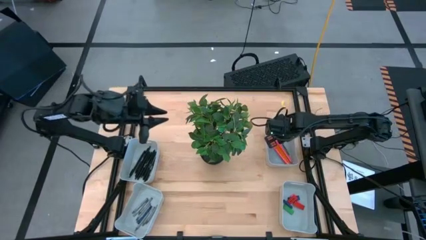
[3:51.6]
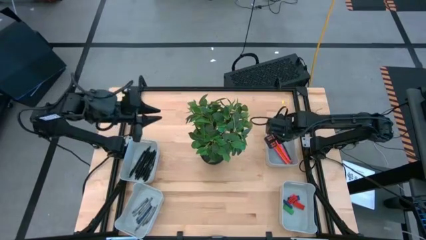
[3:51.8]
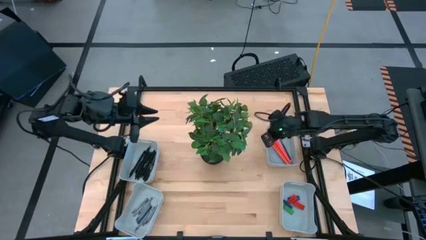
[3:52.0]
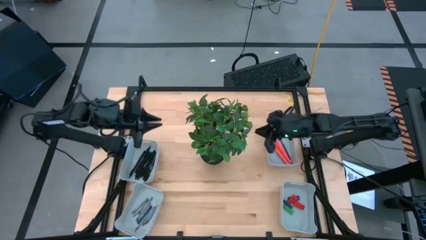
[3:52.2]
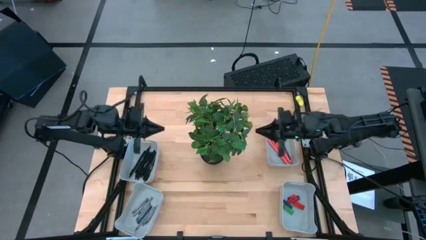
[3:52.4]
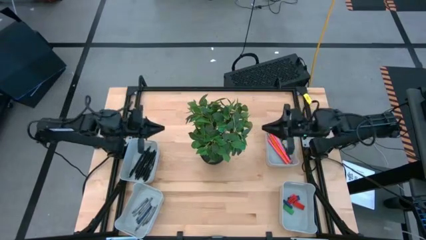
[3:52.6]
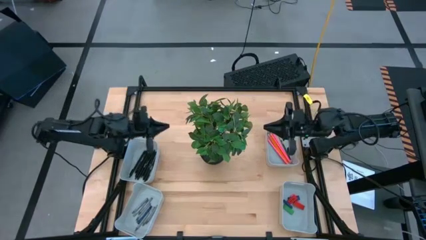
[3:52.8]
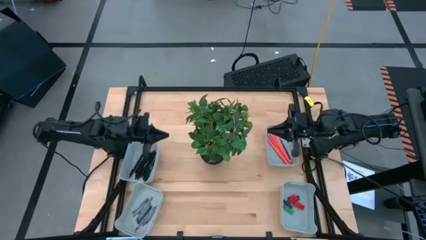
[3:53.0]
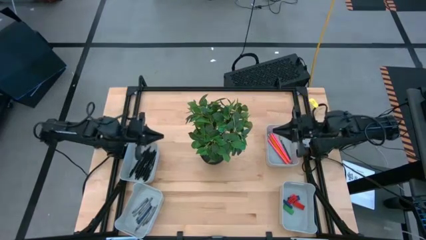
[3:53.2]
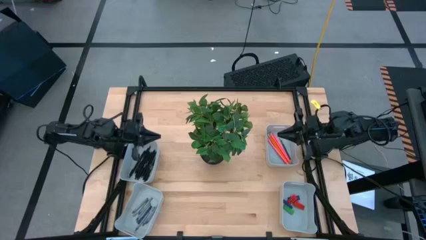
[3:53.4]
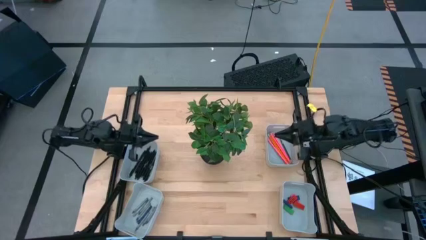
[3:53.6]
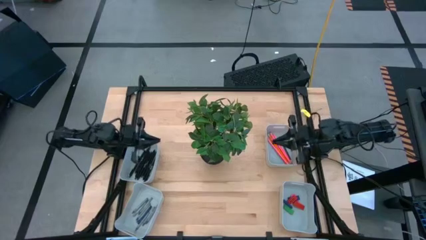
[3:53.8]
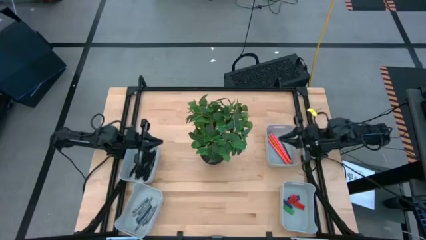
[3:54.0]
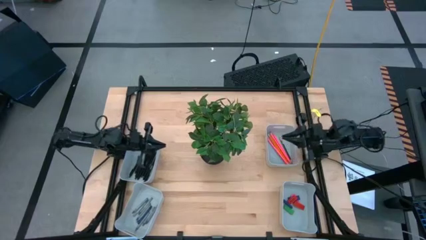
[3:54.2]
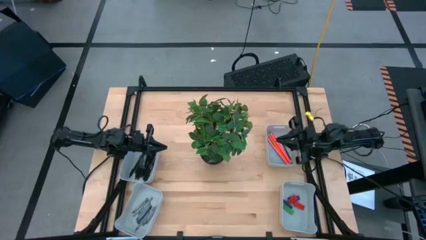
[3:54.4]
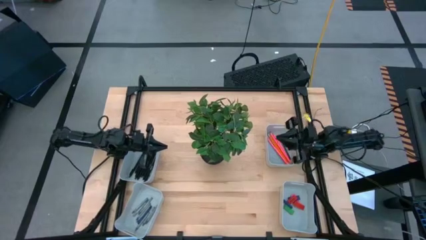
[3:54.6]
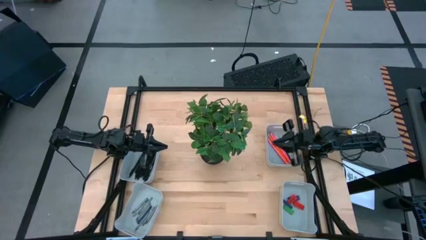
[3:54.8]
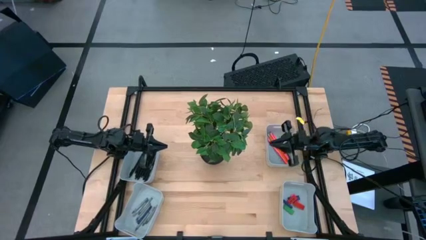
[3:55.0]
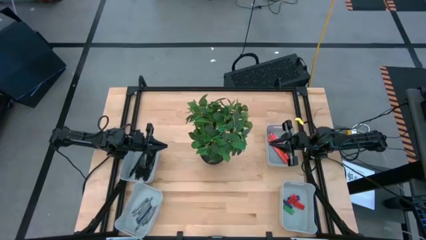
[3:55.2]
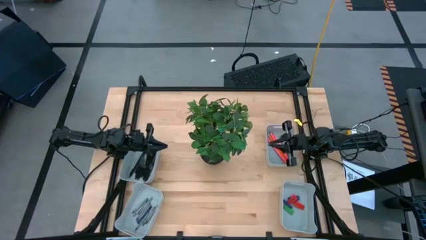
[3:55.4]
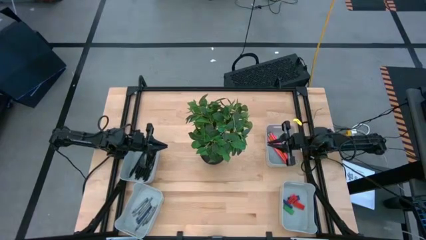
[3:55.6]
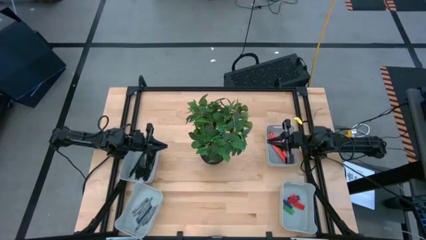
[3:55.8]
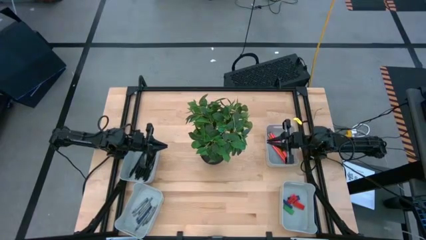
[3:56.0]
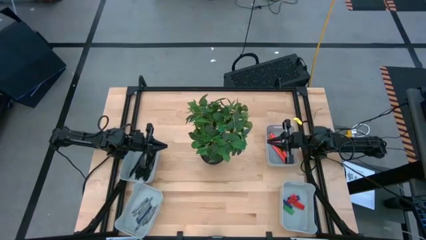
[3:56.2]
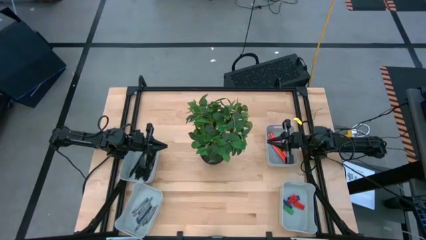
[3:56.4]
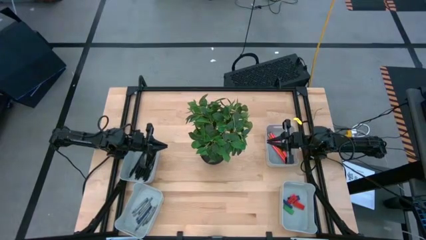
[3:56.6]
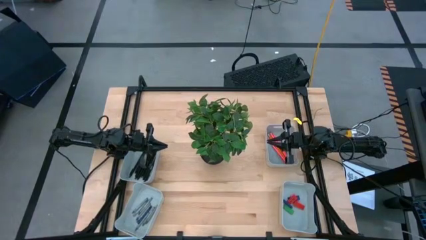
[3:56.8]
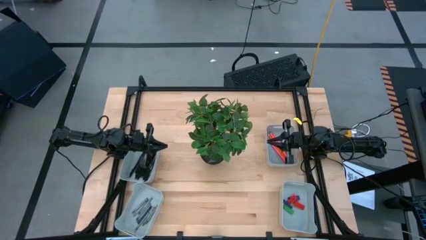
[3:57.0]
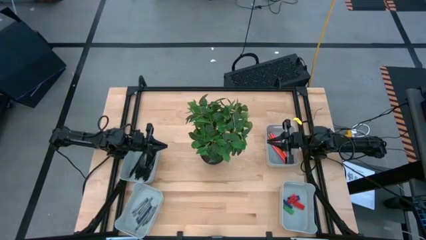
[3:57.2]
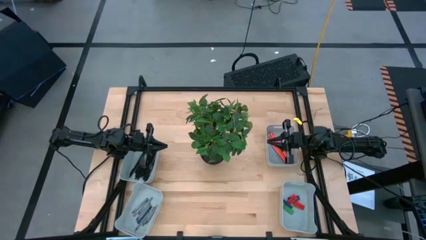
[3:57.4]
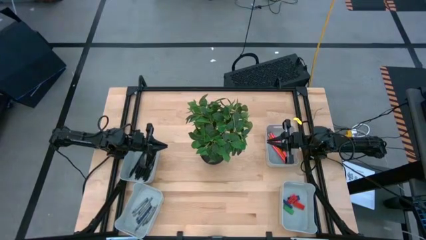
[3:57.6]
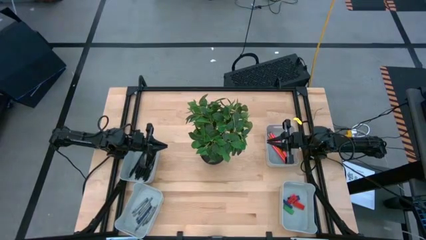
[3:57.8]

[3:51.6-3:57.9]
Task: Sort crayons/erasers/pens/pencils in bins
Return to Home Position

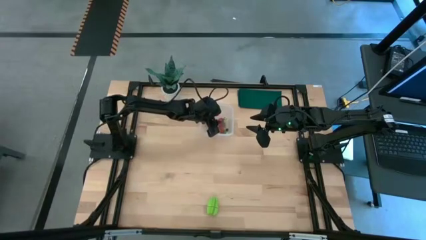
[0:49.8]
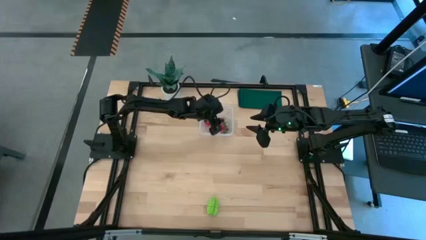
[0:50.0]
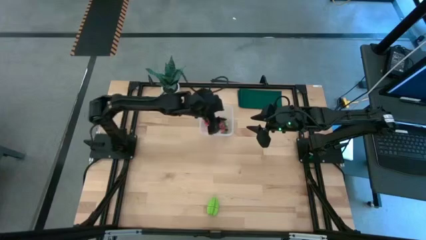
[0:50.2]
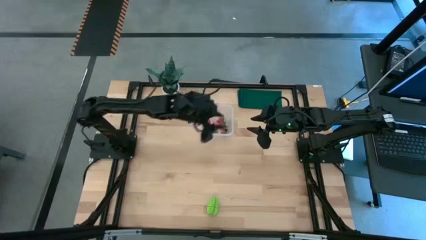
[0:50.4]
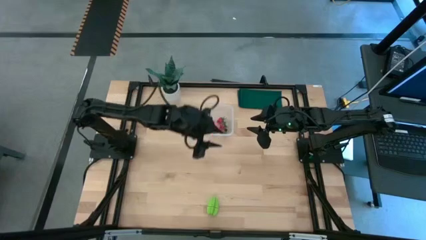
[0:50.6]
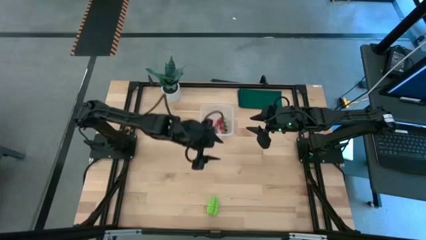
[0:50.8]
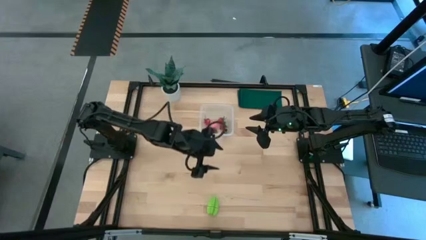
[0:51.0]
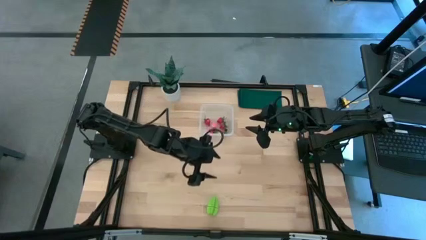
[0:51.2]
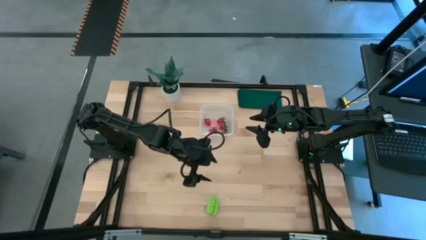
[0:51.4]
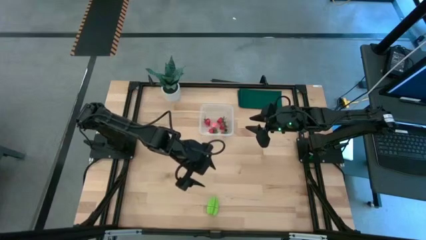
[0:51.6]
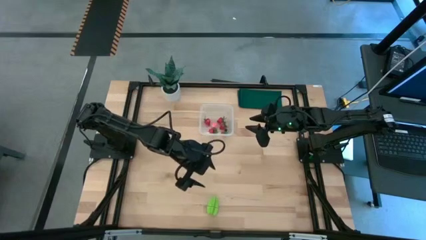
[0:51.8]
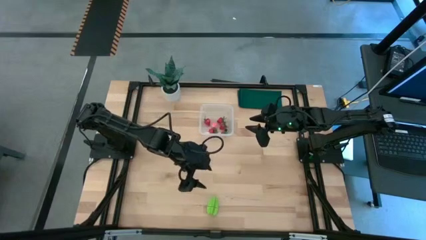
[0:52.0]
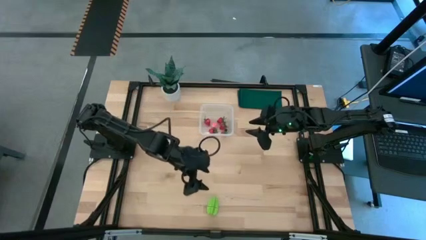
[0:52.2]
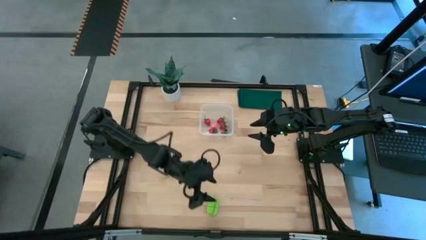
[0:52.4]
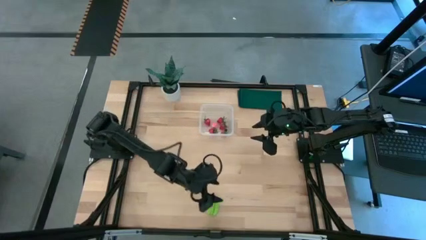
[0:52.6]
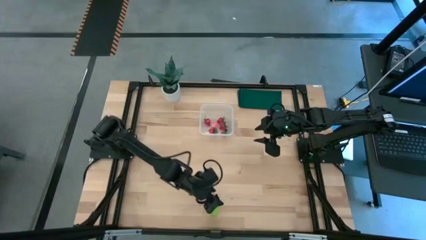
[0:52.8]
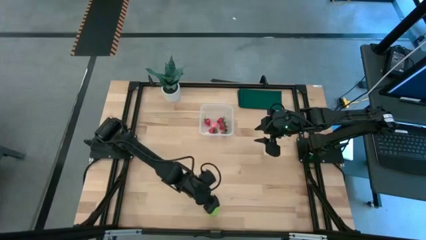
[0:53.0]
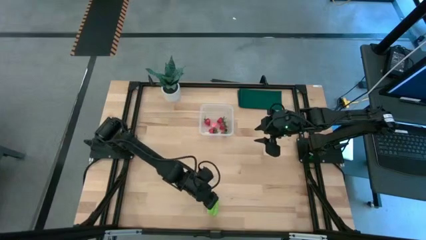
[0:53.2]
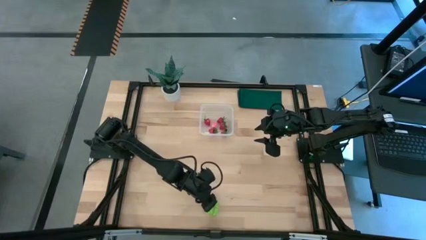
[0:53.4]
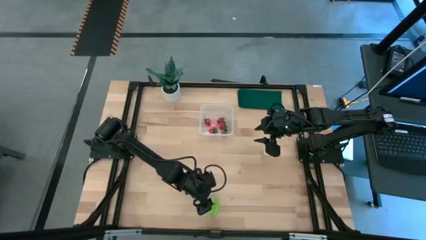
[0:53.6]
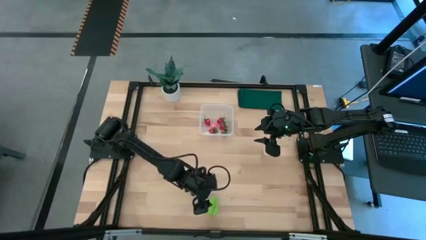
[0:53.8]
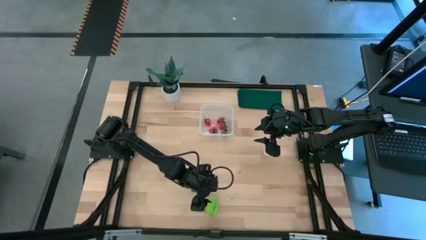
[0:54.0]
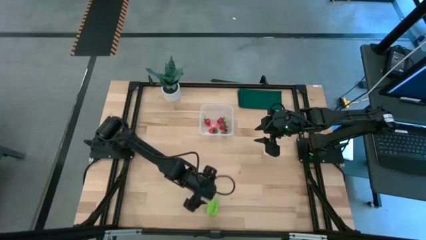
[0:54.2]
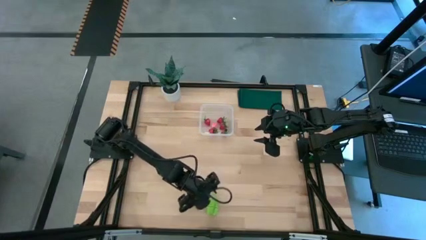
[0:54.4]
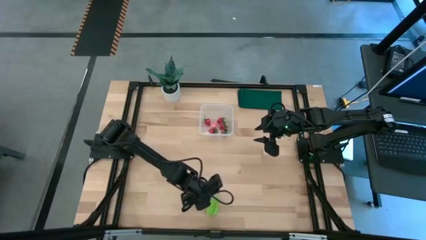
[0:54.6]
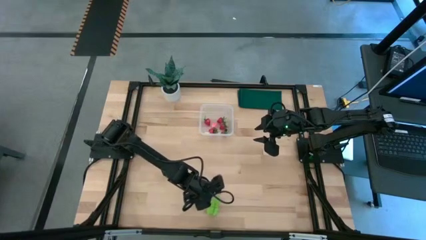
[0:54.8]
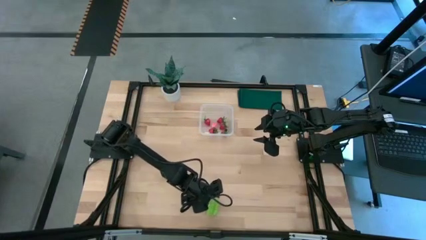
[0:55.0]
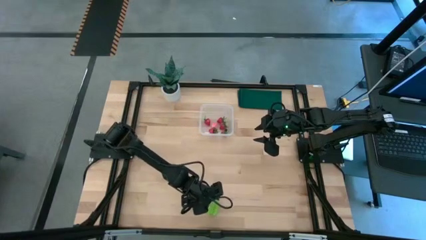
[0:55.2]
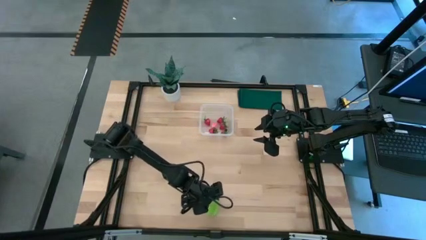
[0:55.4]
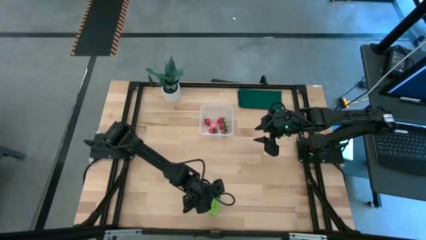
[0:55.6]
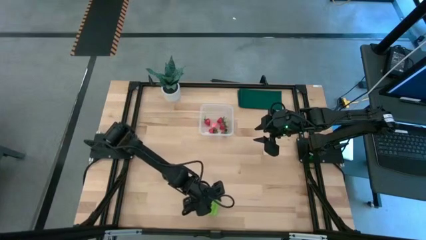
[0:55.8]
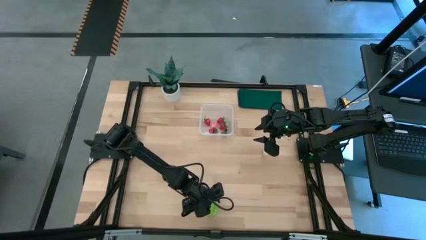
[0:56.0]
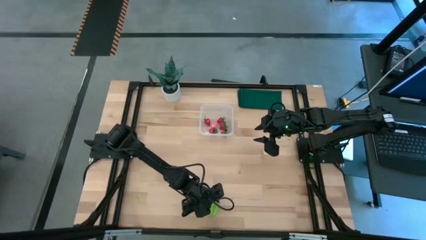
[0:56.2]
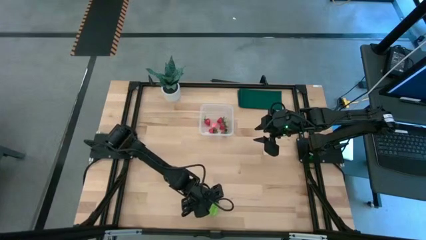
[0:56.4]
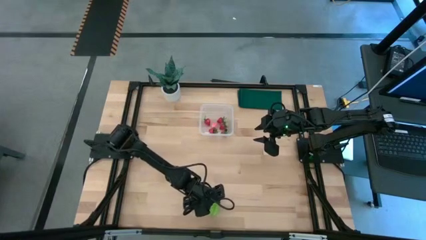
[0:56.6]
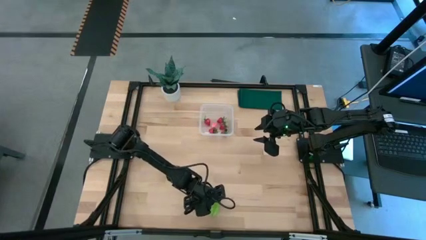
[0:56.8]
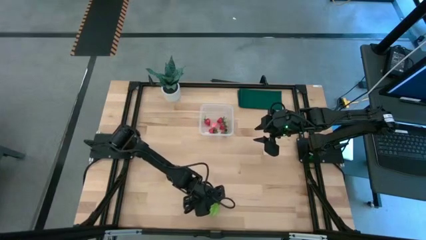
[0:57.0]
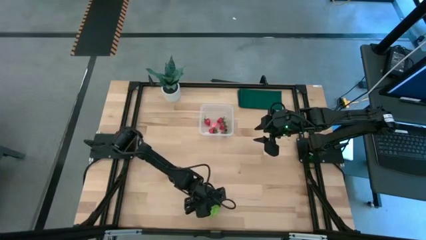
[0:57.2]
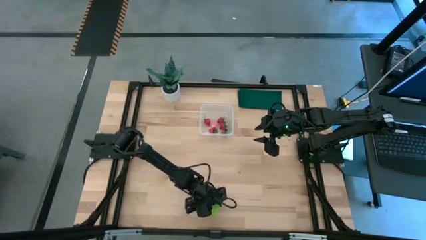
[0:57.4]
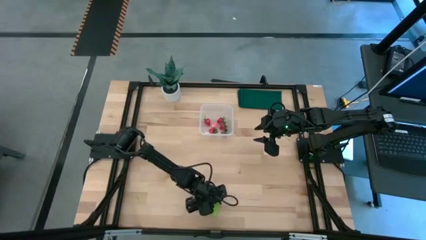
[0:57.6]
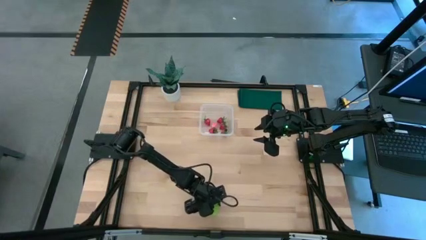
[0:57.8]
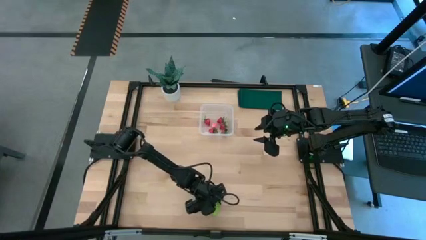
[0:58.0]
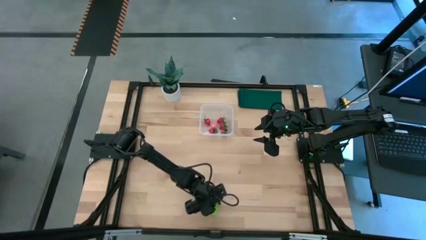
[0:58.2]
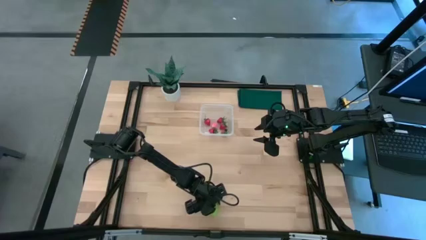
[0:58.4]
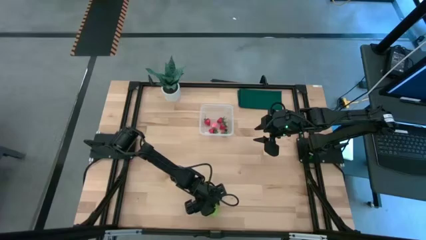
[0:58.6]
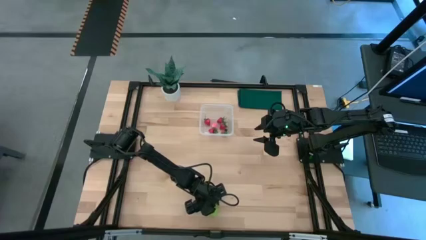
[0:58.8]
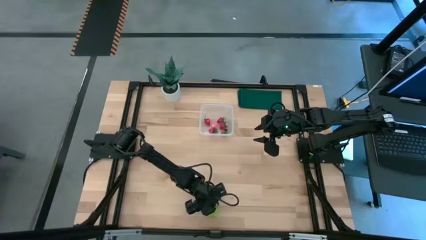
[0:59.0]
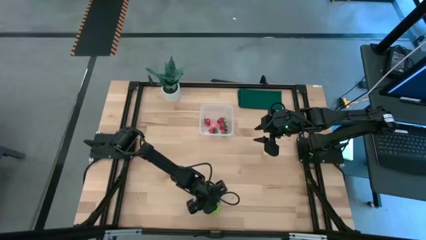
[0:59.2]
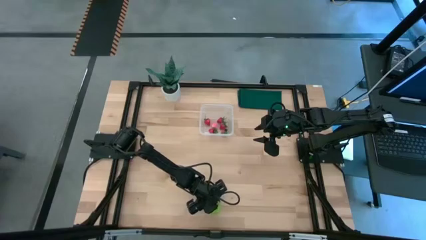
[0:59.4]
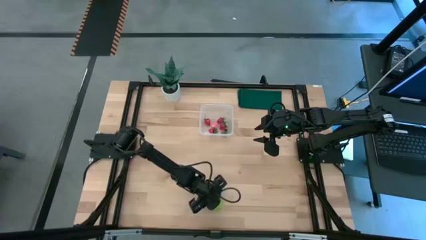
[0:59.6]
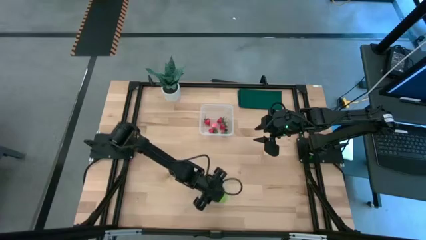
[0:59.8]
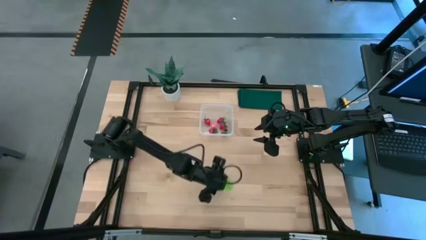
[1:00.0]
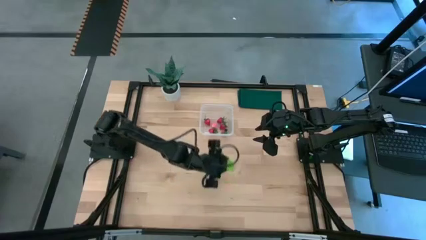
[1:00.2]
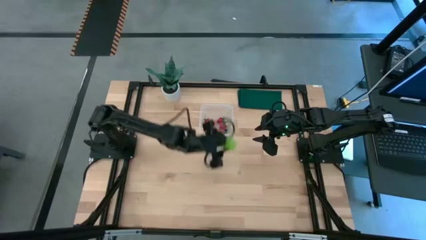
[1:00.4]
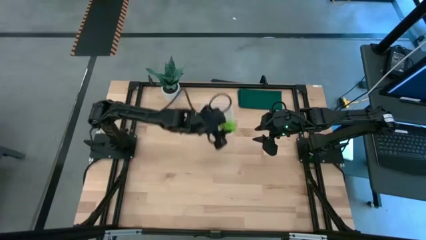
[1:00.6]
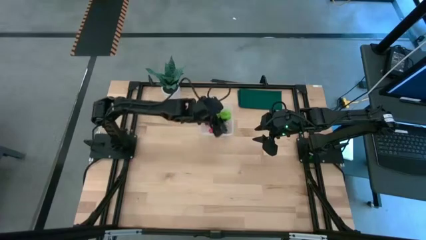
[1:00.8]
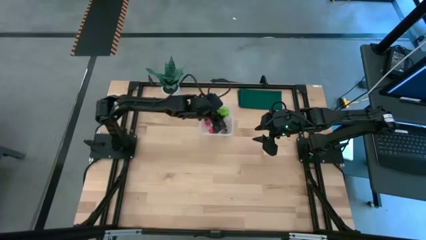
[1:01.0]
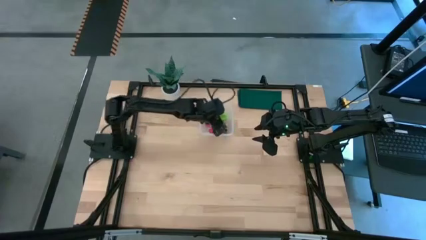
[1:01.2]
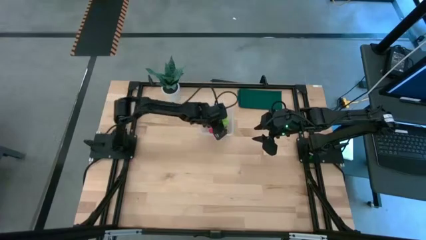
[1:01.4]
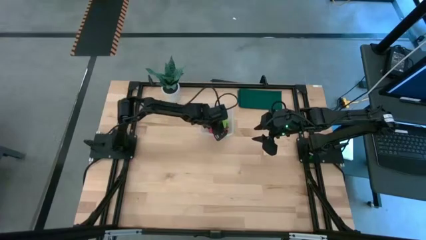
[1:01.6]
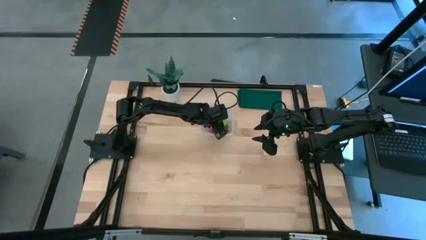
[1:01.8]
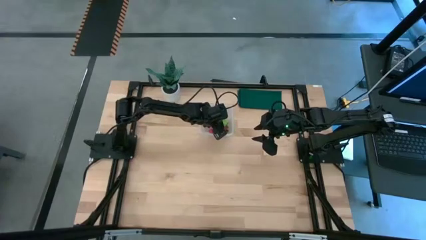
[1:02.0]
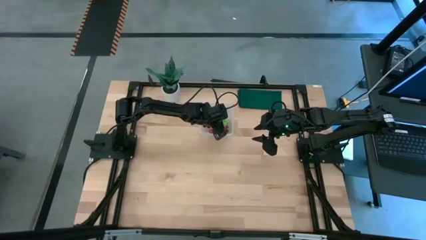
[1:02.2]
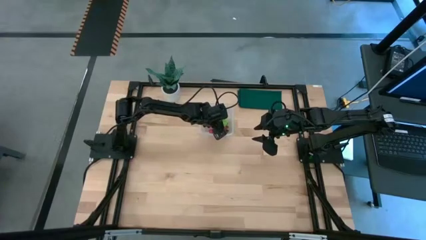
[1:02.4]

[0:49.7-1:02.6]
Task: Pick and placing Produce into tupperware
Put the starfruit into the transparent container
